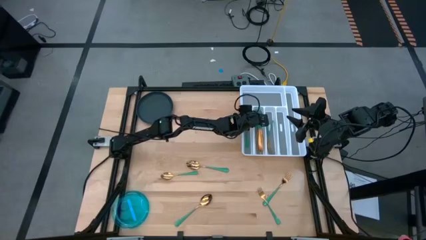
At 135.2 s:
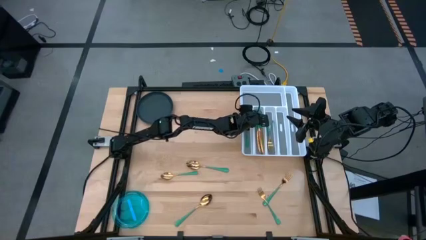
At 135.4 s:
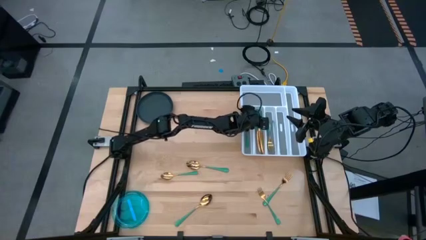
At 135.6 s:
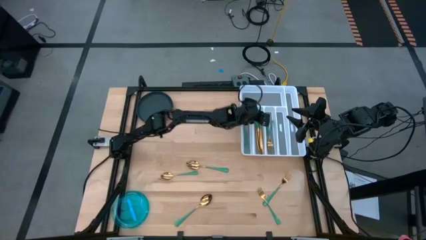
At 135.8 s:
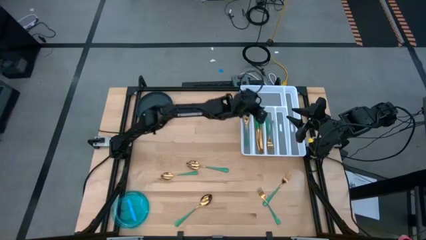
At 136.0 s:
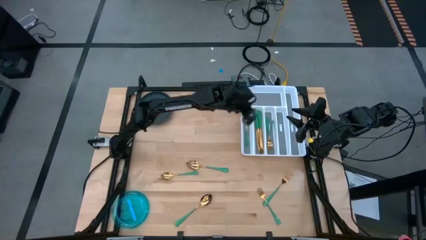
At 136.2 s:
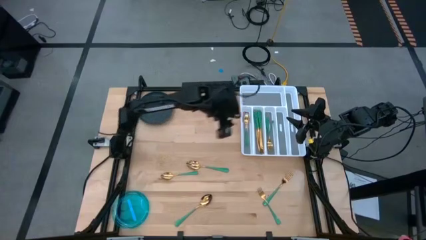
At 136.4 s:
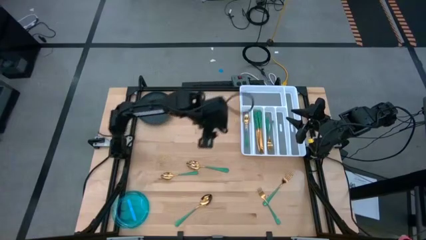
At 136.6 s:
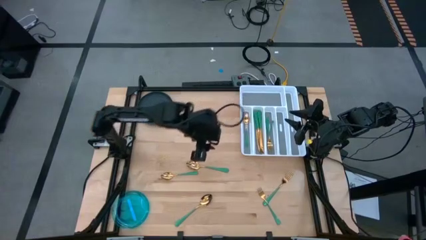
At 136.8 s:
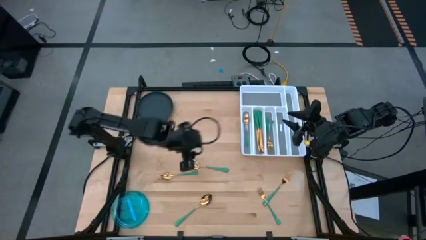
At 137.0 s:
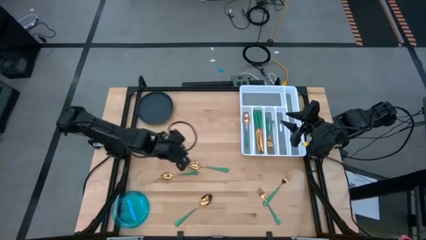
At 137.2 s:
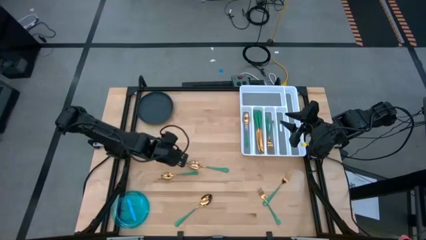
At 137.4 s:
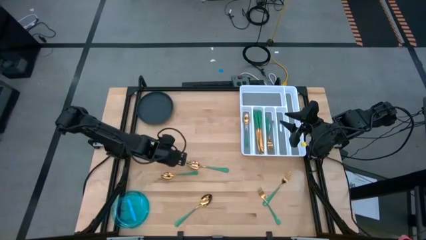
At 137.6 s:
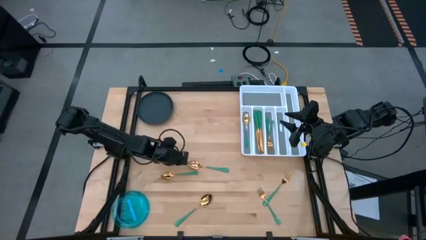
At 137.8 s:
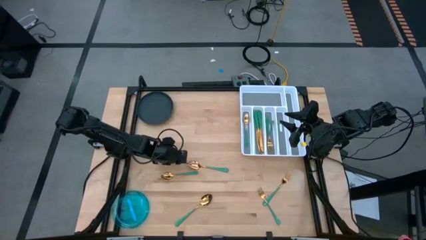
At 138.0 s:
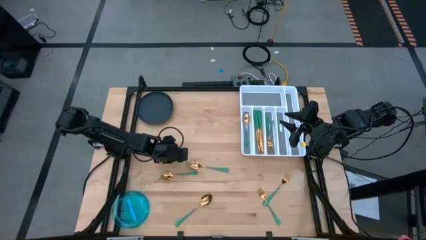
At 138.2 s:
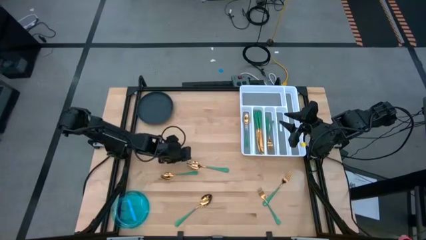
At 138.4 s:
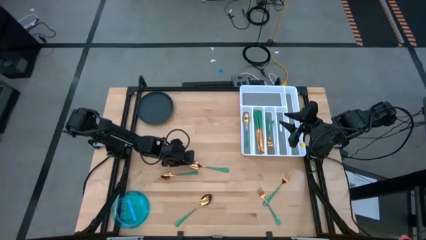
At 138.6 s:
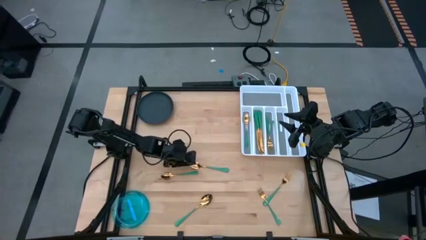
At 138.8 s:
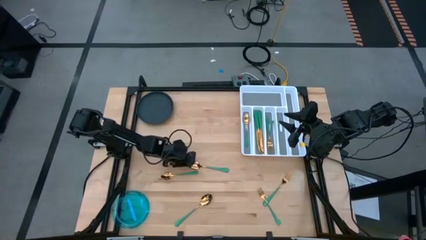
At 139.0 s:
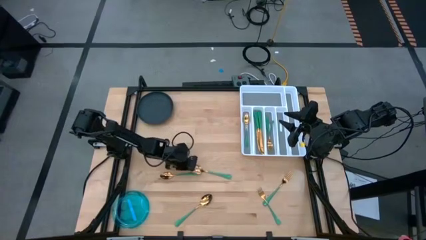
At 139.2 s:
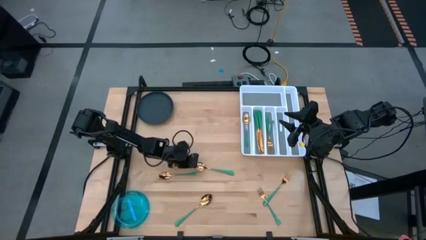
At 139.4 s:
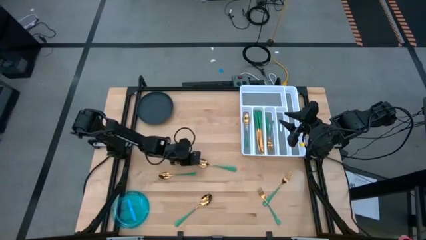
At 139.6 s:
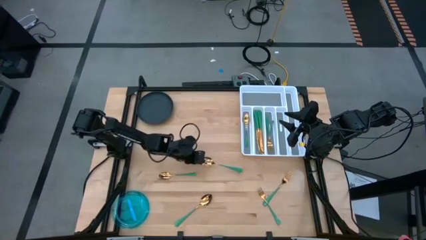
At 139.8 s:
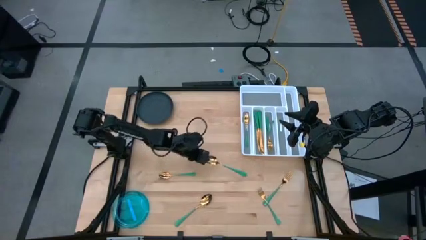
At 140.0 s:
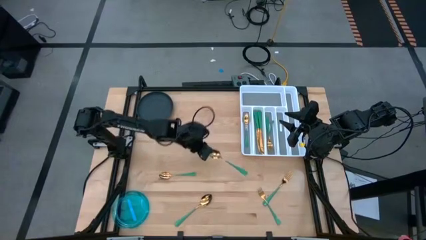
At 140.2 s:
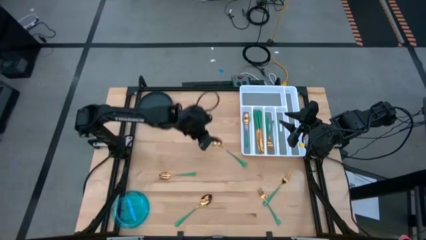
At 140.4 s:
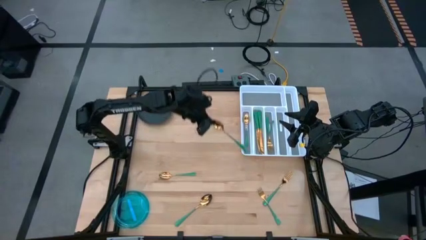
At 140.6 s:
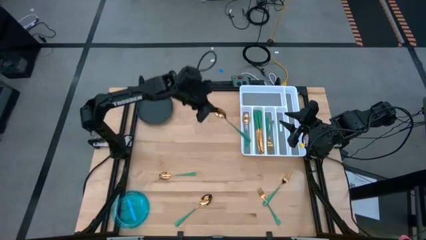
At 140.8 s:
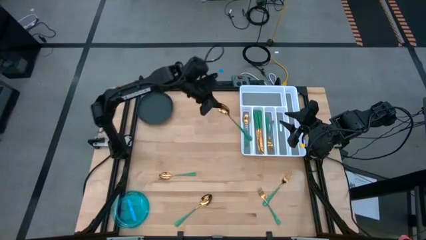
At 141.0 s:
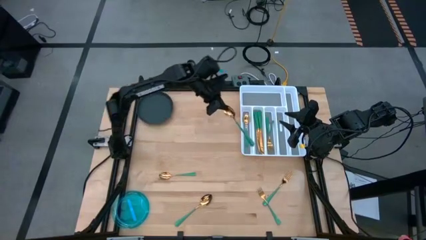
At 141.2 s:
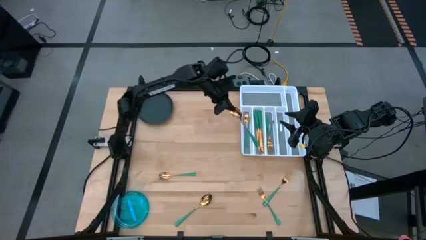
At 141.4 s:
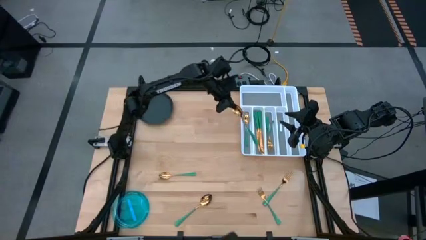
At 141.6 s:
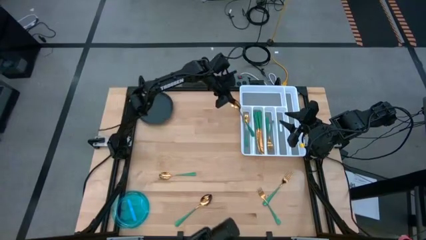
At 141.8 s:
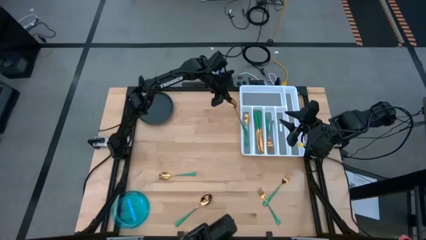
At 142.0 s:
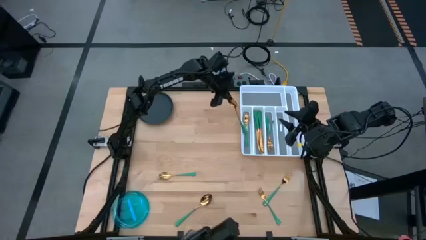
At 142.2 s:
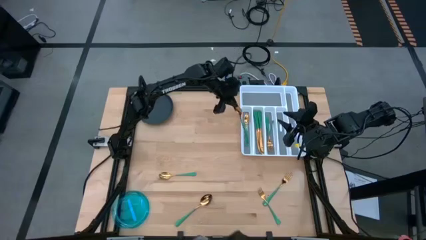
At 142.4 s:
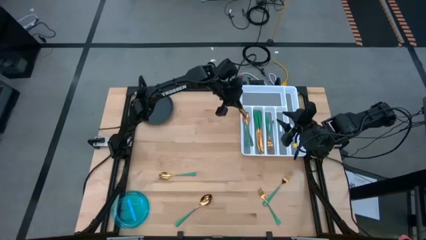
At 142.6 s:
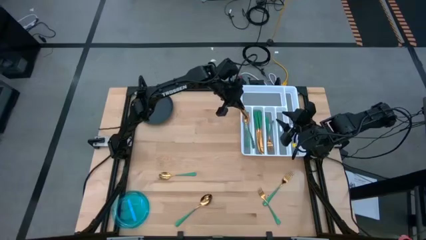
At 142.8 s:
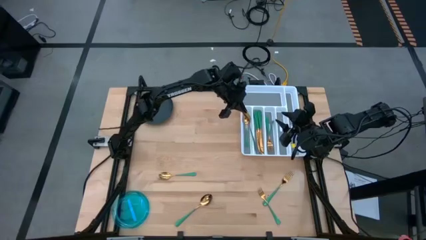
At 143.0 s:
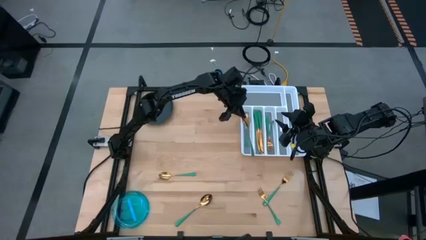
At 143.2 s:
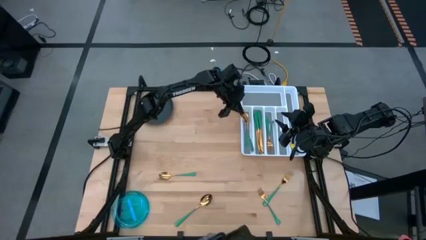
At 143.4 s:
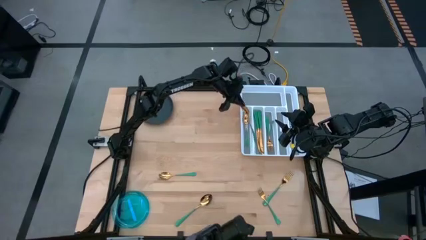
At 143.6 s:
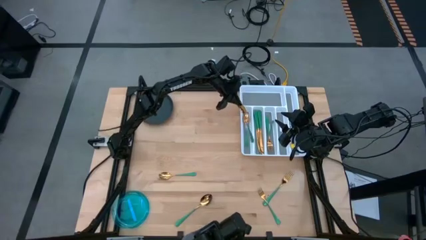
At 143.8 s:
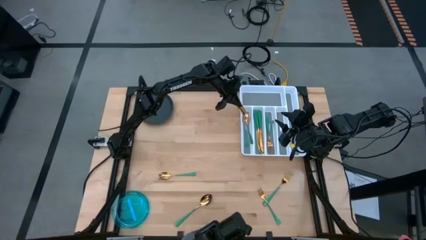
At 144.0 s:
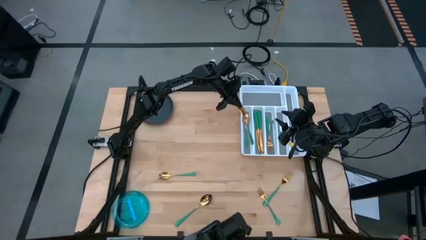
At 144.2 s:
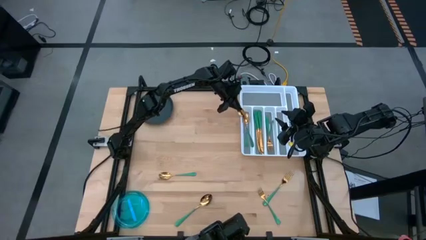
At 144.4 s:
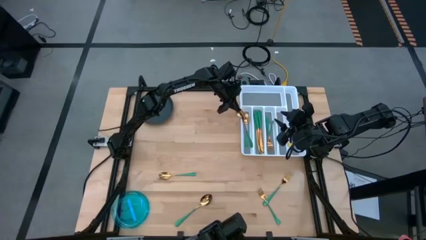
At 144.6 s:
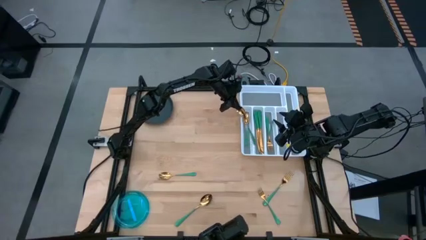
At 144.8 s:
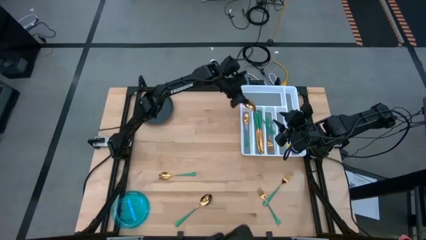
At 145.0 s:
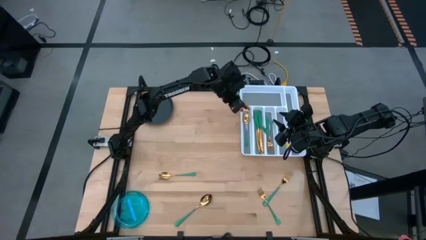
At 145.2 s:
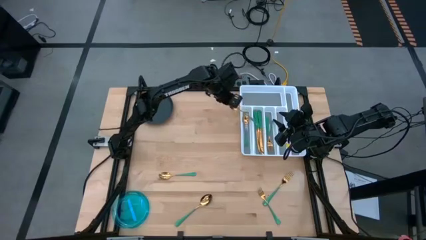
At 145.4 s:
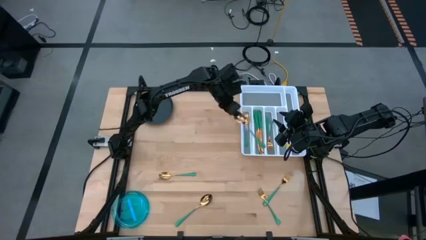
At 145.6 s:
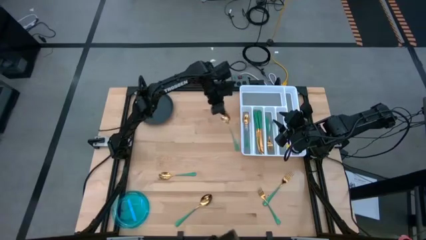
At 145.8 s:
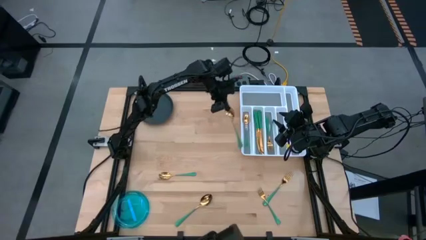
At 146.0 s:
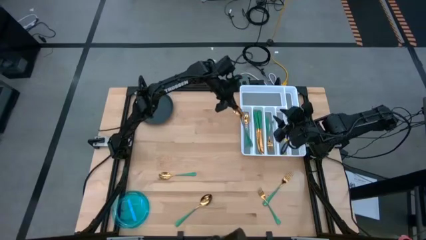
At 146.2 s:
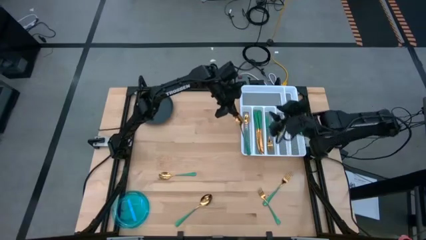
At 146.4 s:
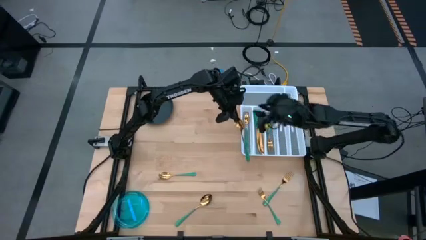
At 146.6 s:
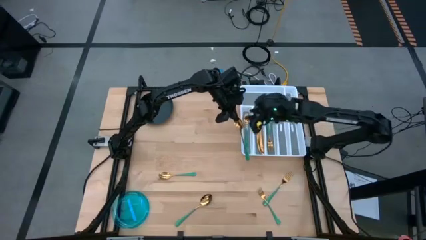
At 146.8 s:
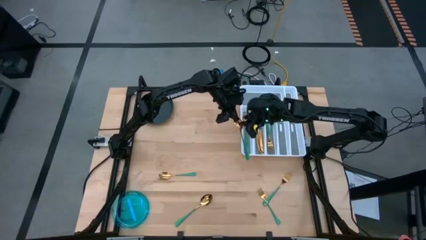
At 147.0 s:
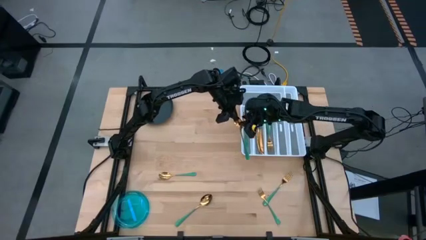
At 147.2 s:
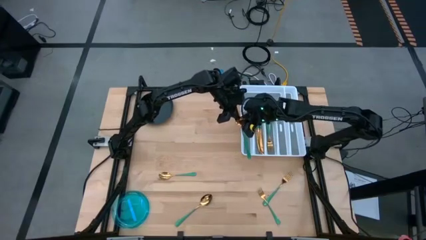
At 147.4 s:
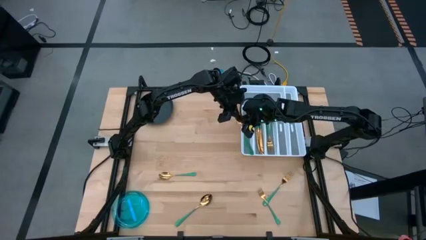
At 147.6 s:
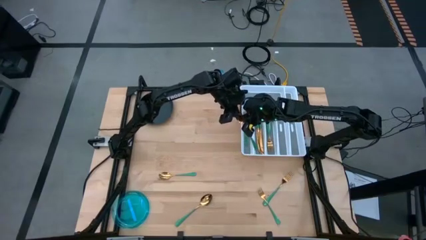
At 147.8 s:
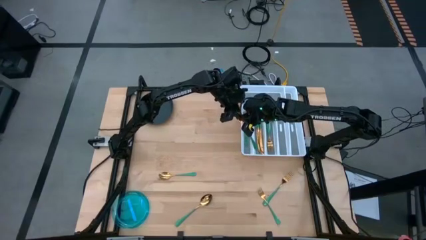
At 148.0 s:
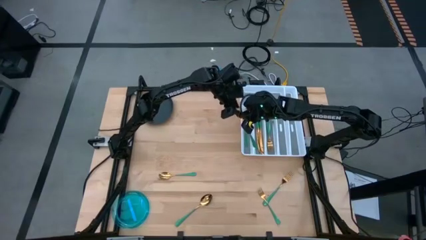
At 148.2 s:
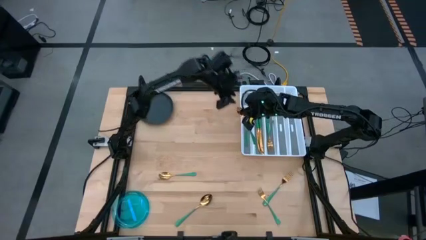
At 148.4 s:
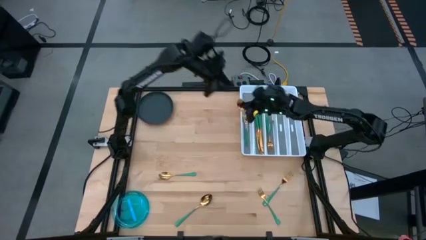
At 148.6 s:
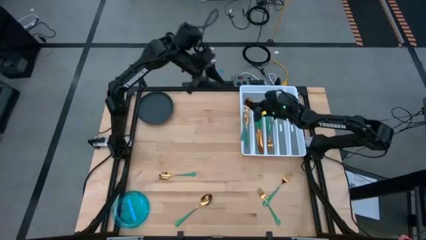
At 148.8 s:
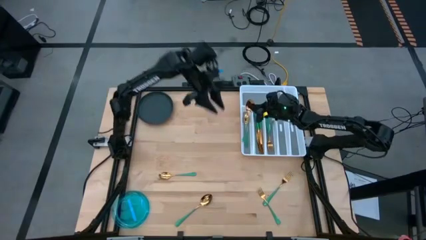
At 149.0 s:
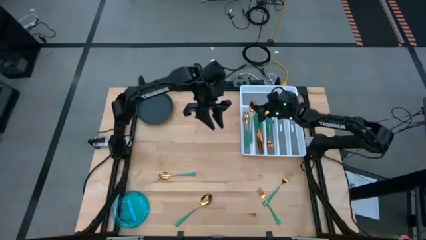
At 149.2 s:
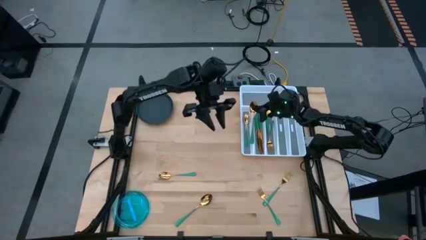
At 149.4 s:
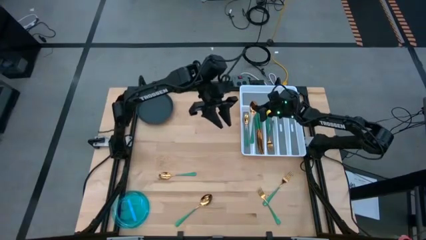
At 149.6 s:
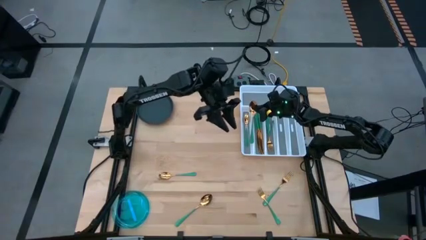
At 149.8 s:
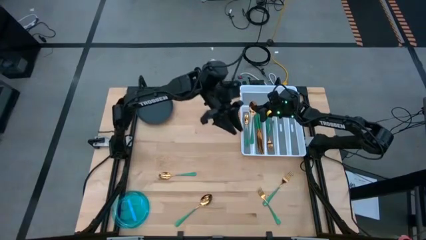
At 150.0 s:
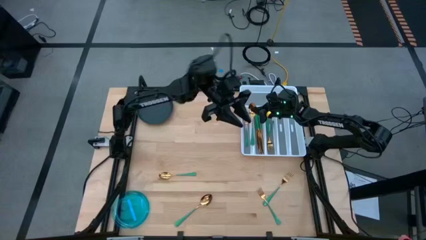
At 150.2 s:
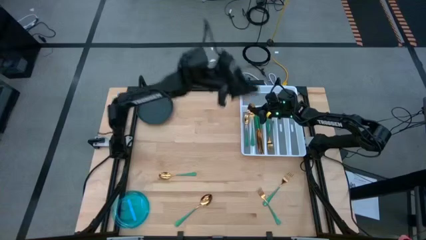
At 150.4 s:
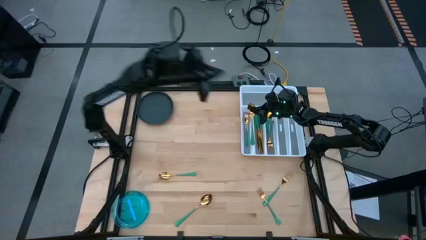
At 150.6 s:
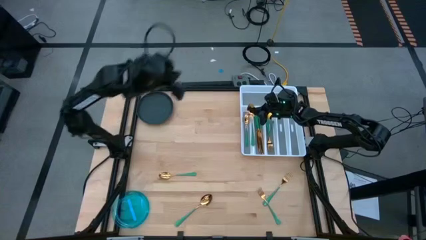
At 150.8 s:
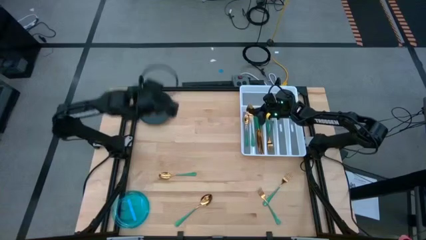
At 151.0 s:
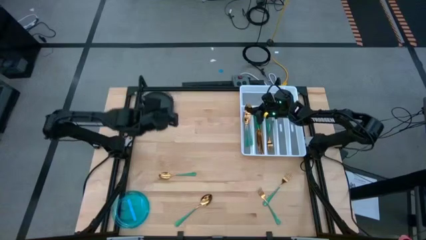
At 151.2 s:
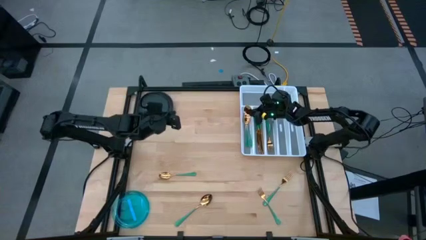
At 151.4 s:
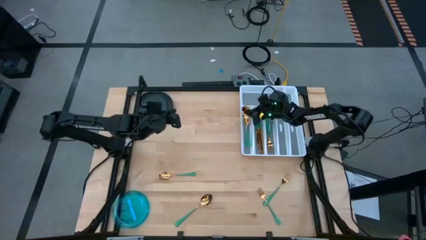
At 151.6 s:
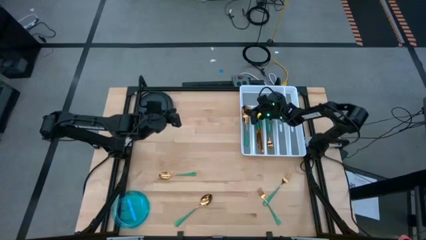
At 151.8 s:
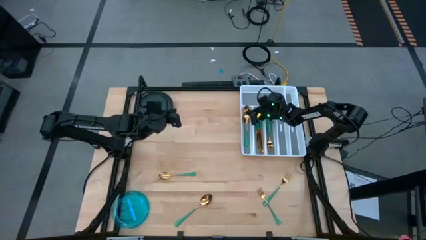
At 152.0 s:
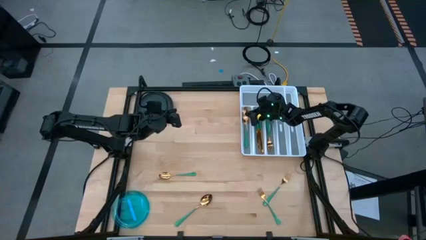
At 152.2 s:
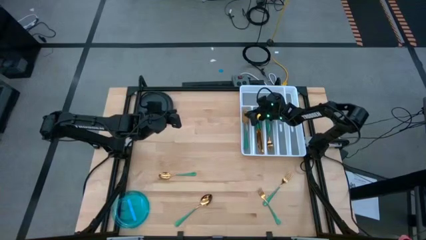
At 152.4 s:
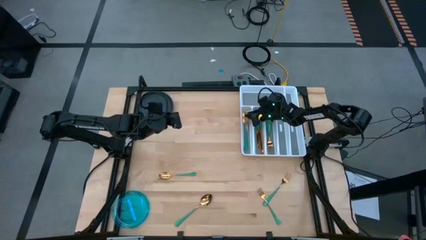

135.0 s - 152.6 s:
Task: Sort silverware
Put the green spoon into the silverware tray
